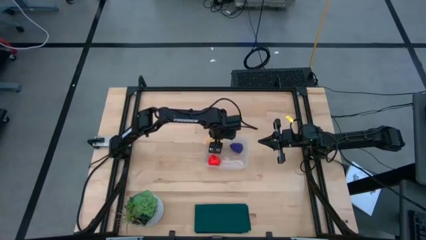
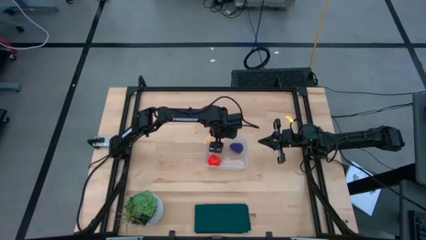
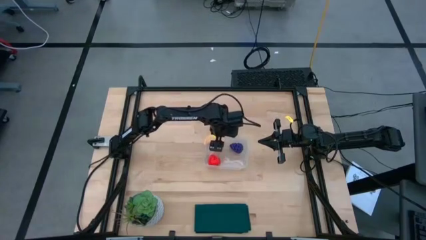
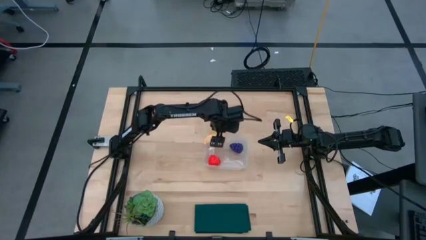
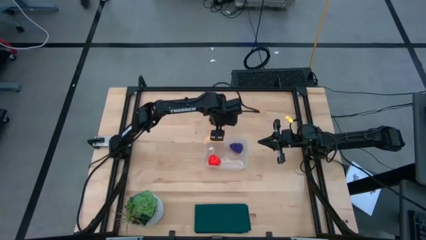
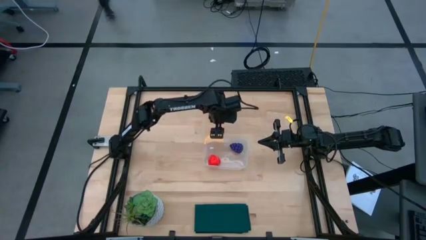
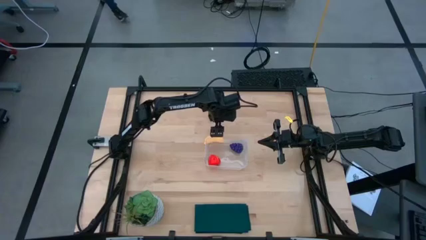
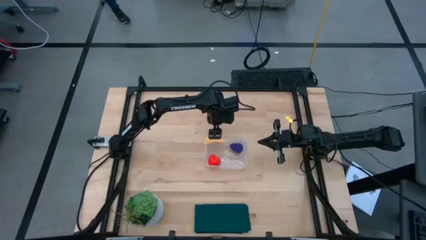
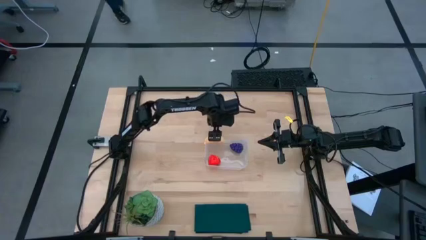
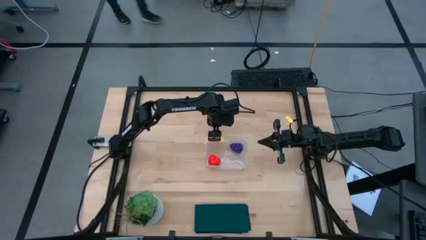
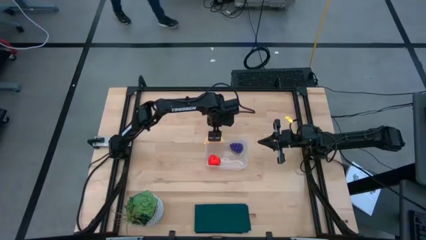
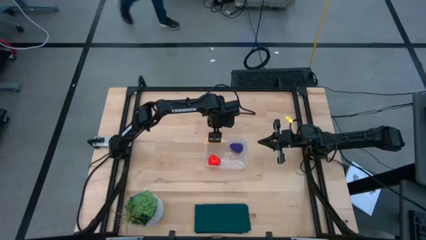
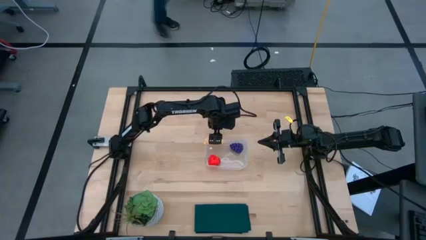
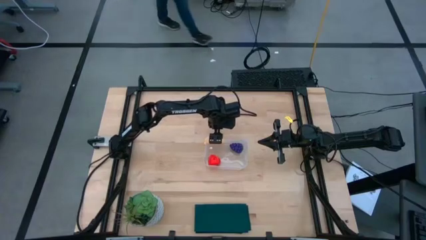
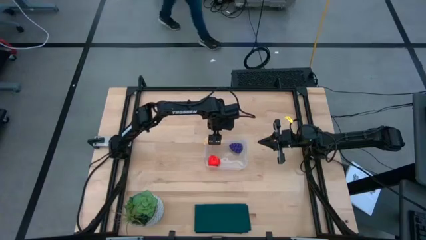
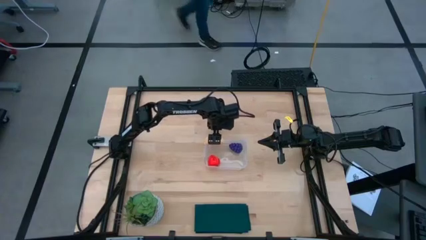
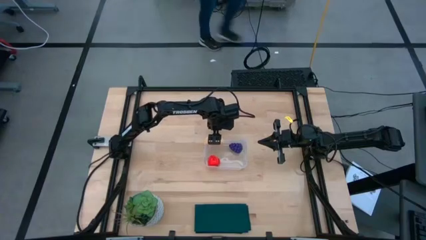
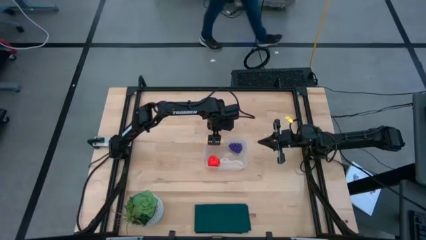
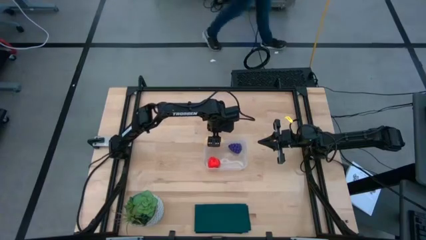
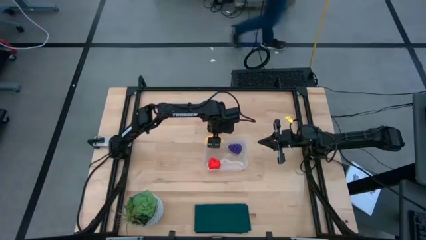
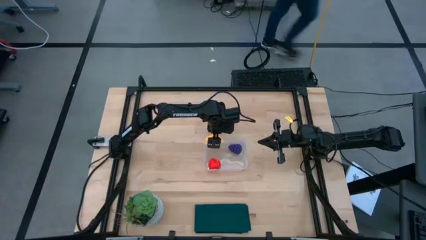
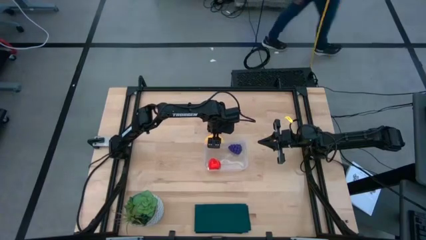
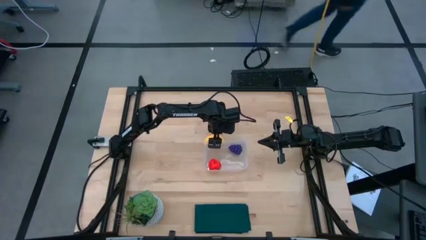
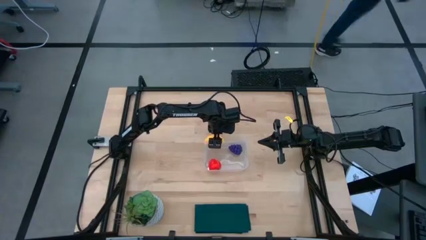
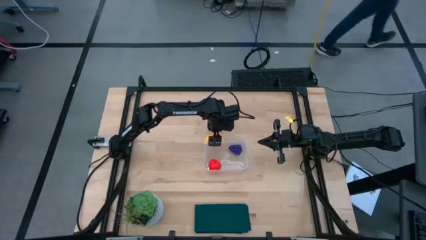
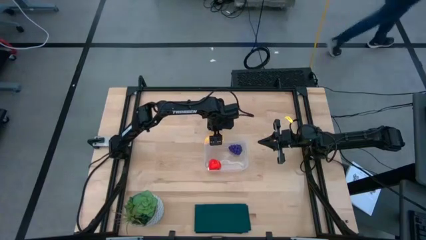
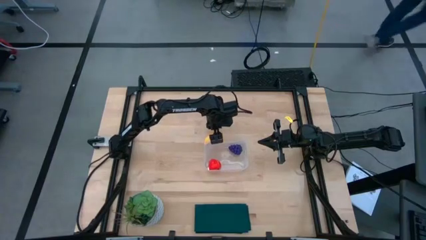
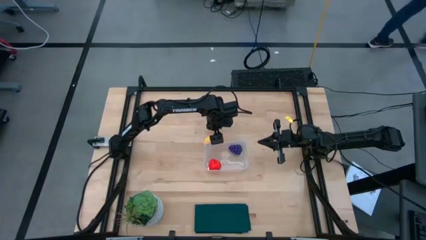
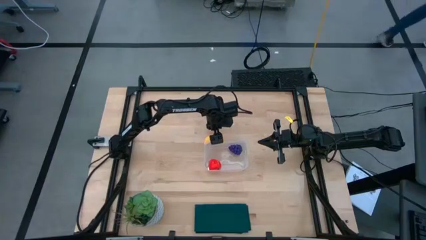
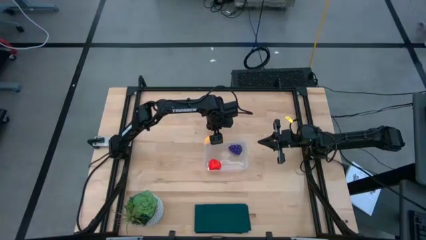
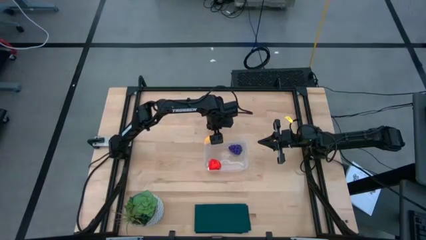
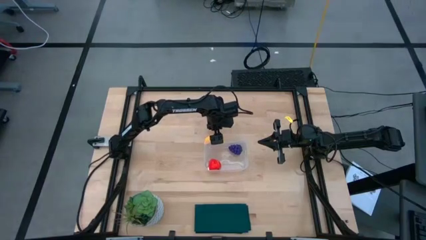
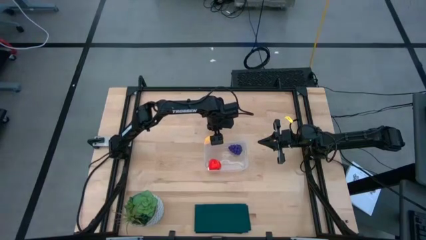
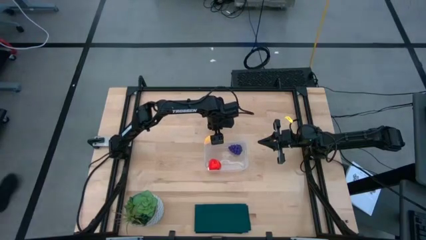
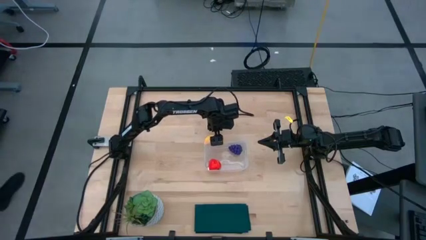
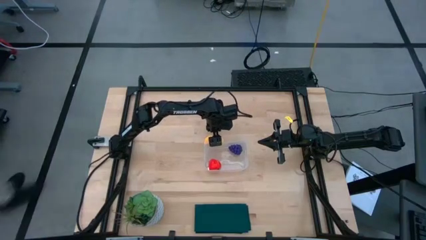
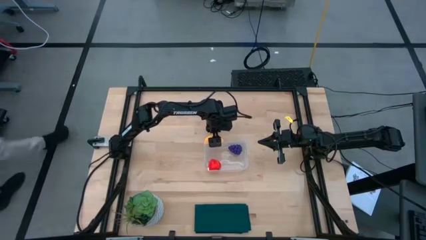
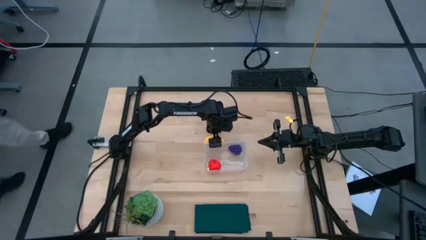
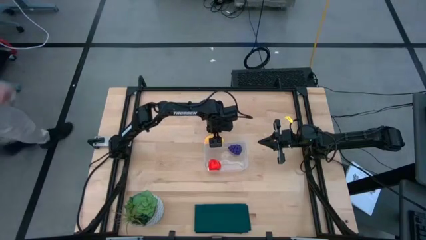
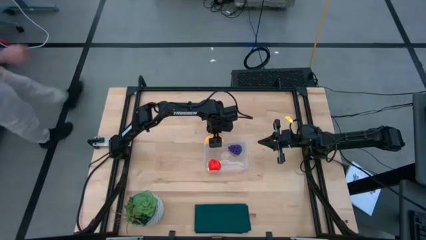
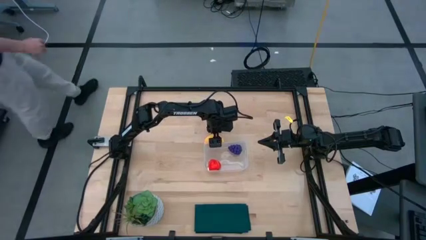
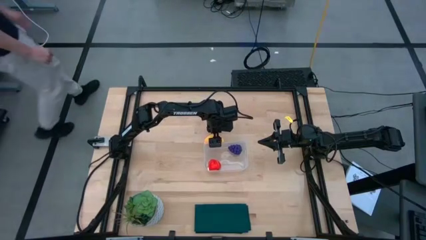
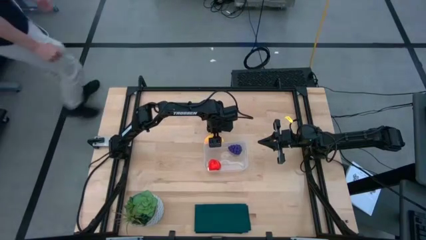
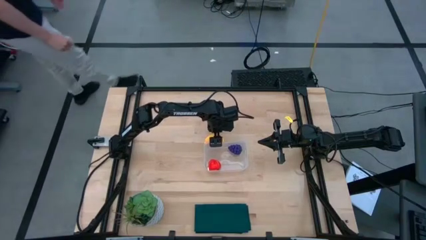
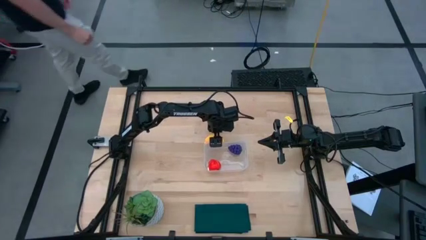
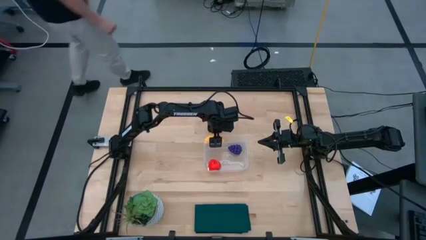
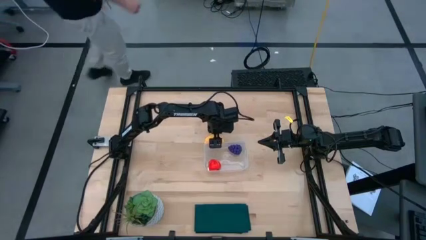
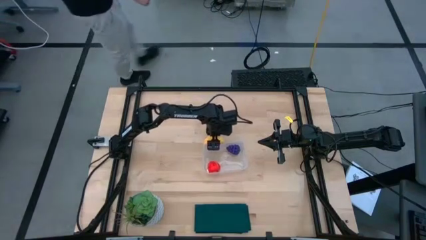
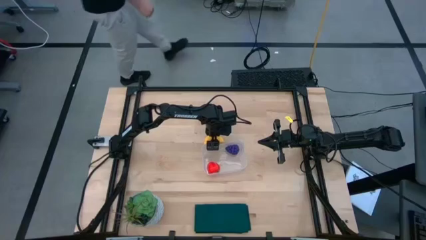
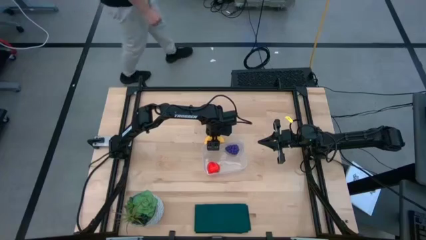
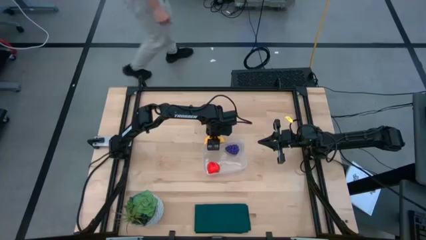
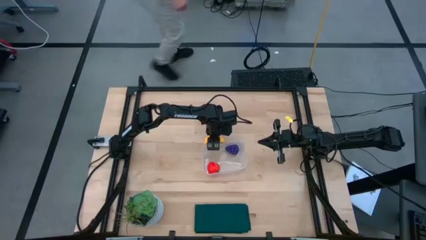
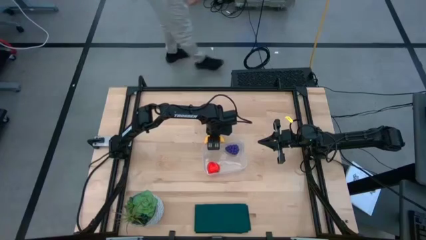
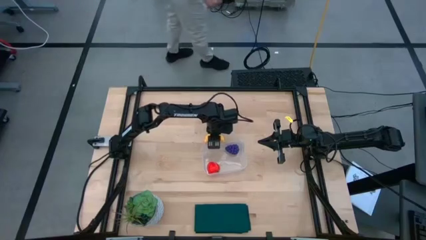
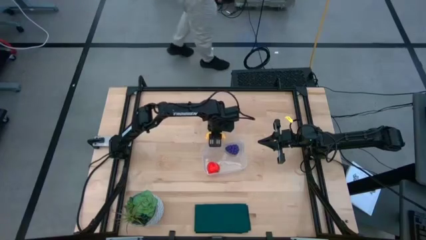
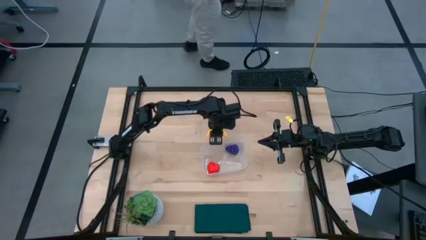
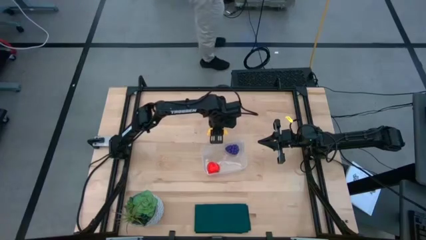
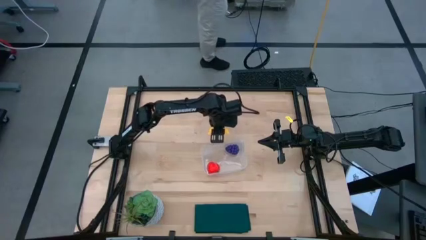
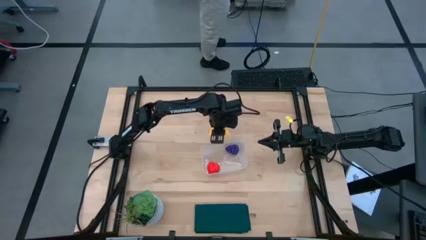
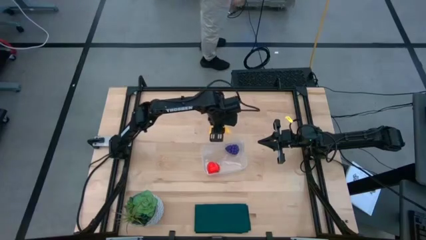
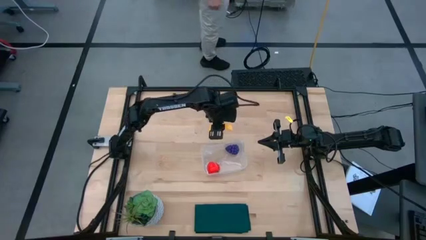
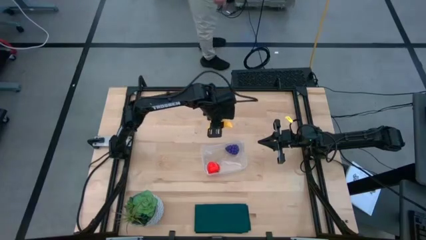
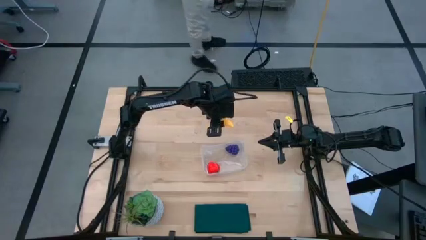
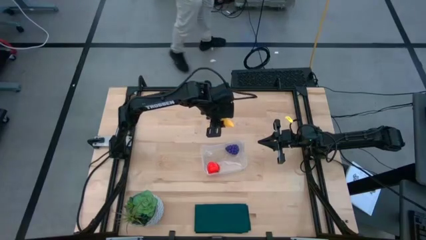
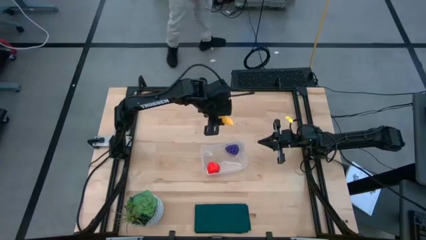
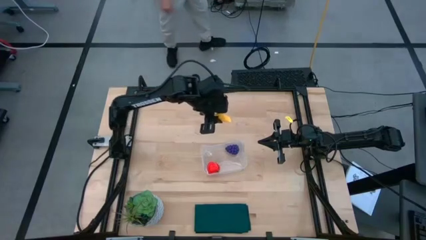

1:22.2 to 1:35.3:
Task: Pick and placing Produce into tupperware
Put the banana into the transparent bin
